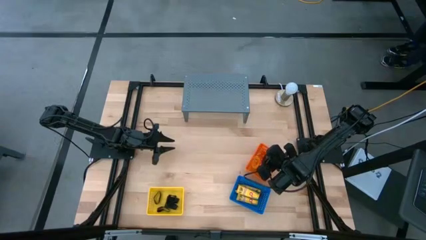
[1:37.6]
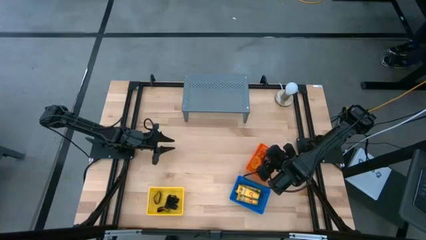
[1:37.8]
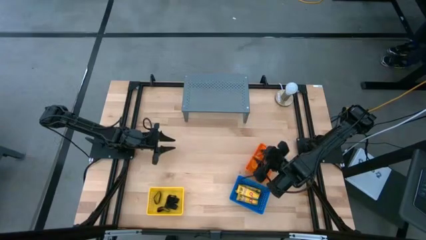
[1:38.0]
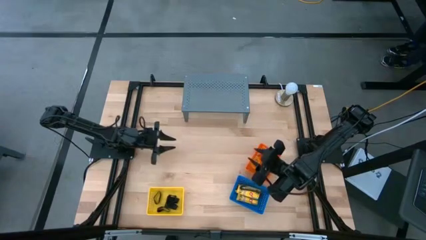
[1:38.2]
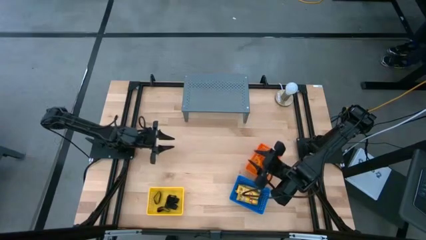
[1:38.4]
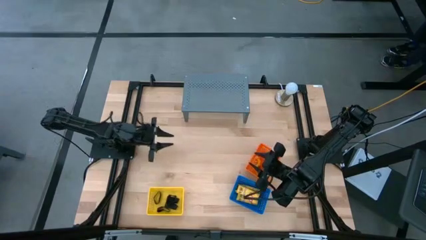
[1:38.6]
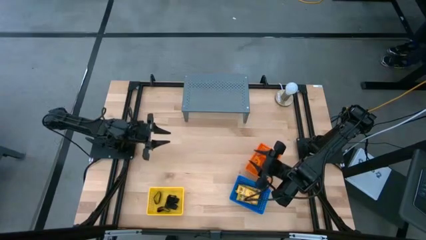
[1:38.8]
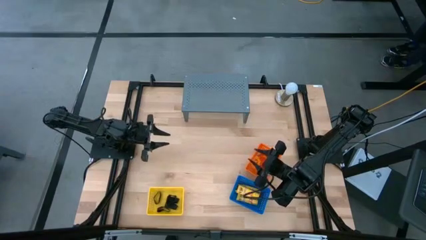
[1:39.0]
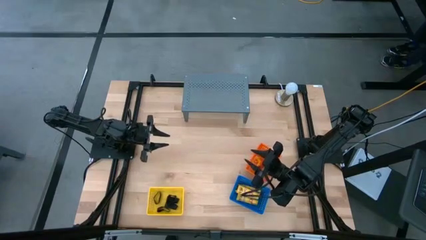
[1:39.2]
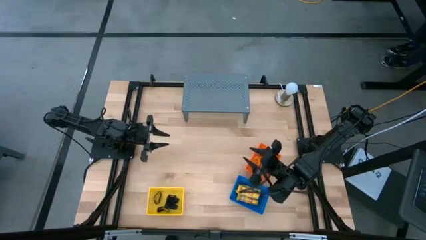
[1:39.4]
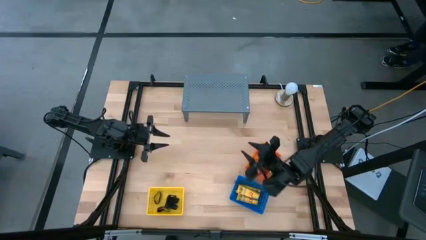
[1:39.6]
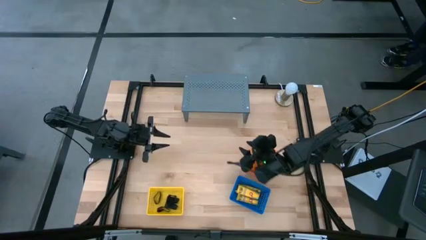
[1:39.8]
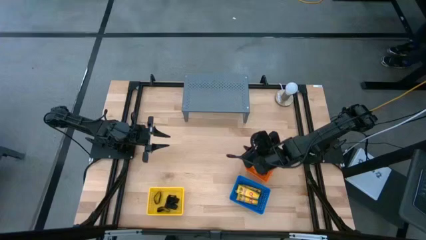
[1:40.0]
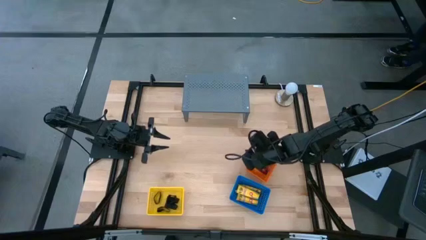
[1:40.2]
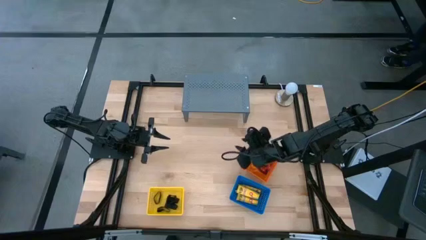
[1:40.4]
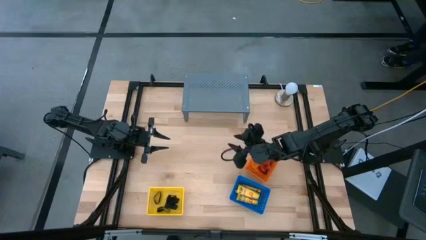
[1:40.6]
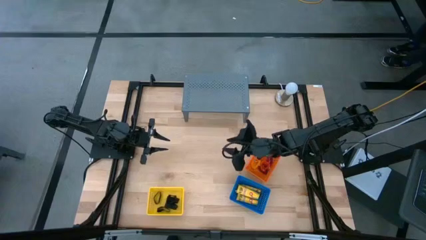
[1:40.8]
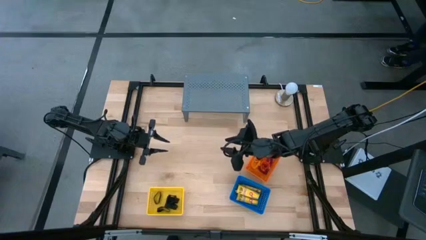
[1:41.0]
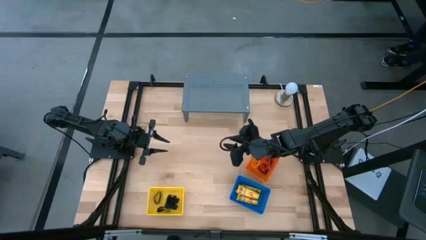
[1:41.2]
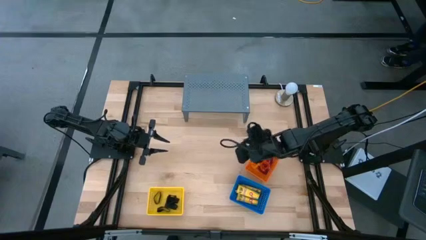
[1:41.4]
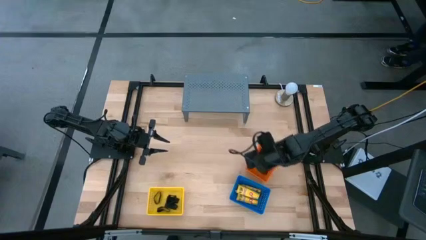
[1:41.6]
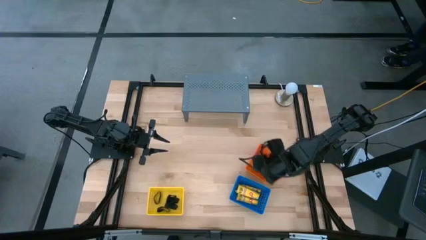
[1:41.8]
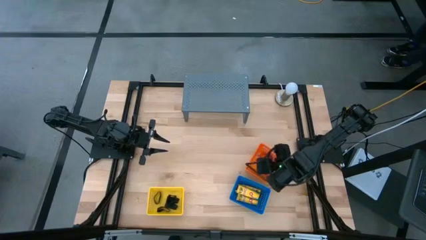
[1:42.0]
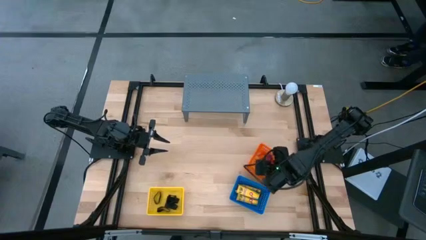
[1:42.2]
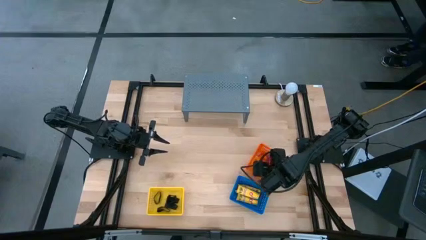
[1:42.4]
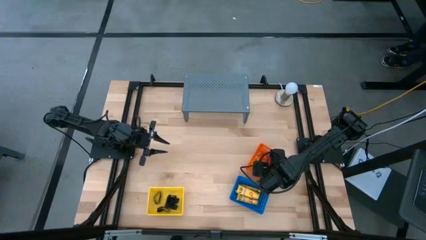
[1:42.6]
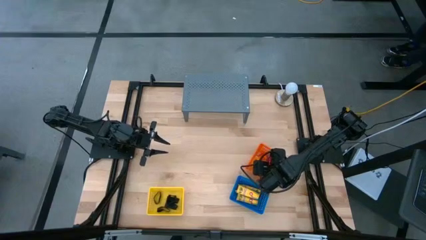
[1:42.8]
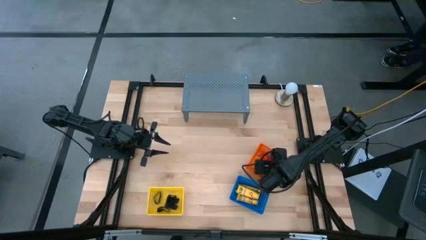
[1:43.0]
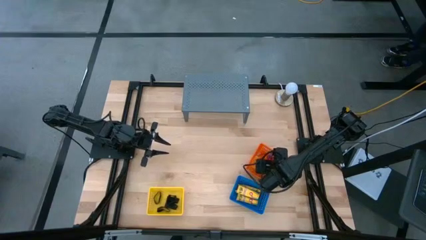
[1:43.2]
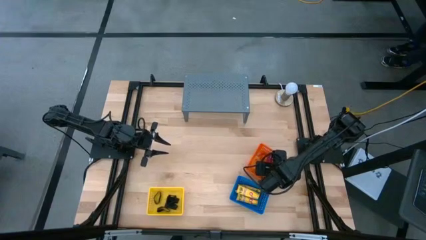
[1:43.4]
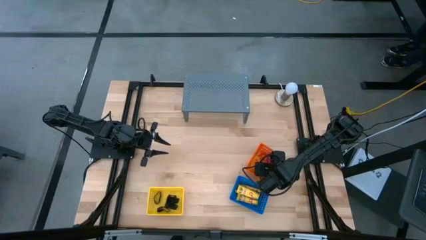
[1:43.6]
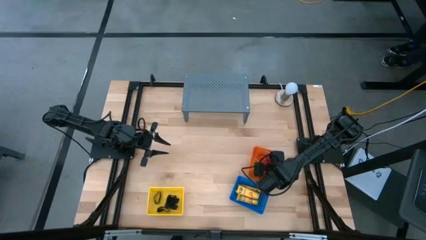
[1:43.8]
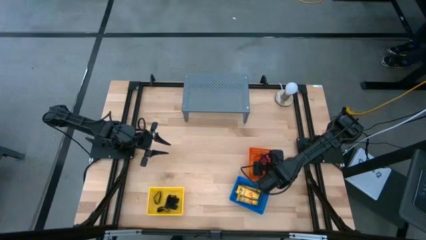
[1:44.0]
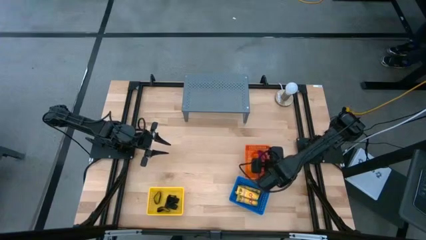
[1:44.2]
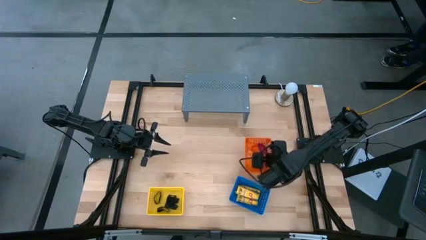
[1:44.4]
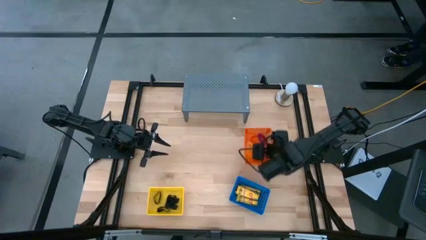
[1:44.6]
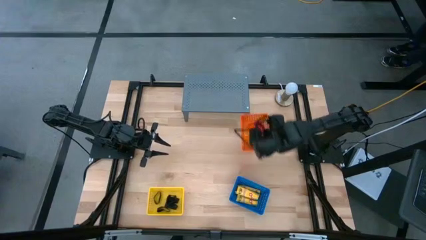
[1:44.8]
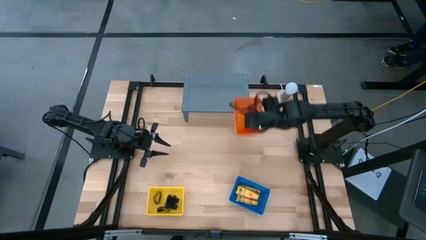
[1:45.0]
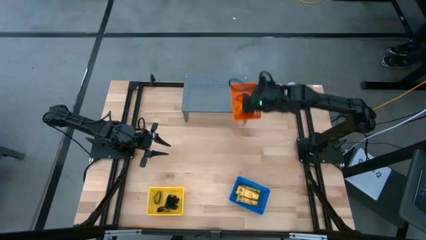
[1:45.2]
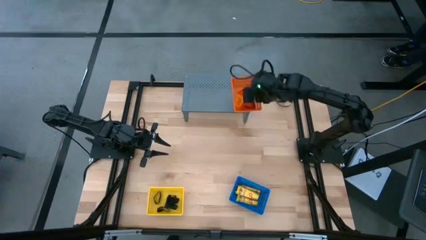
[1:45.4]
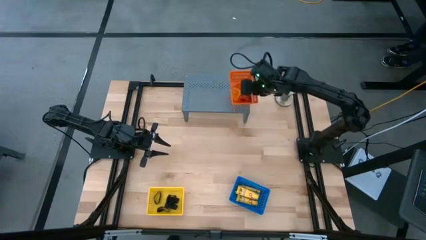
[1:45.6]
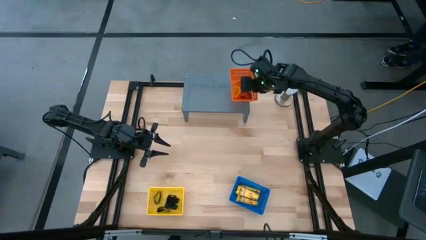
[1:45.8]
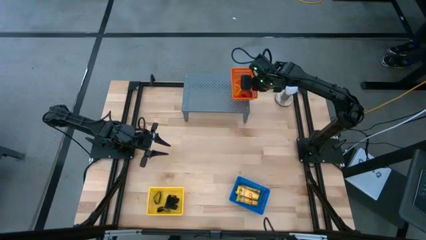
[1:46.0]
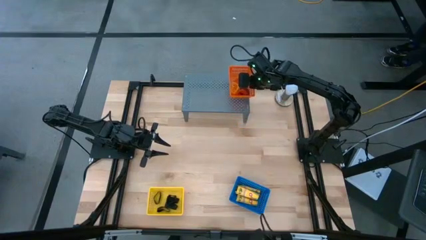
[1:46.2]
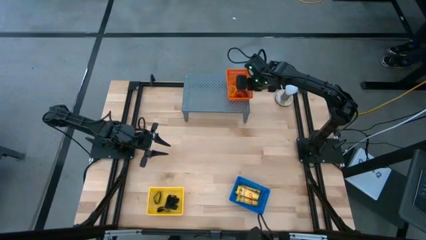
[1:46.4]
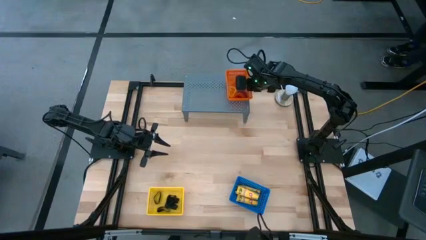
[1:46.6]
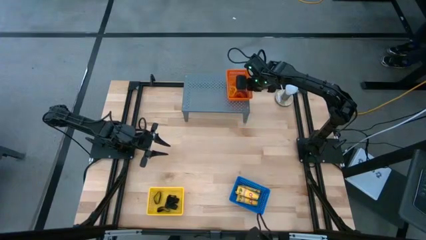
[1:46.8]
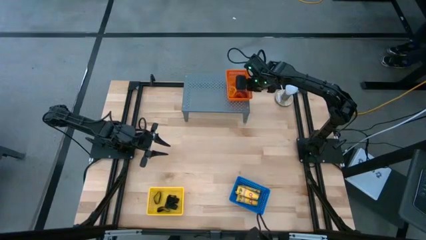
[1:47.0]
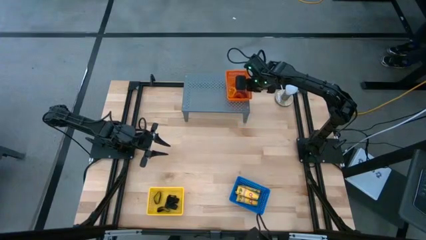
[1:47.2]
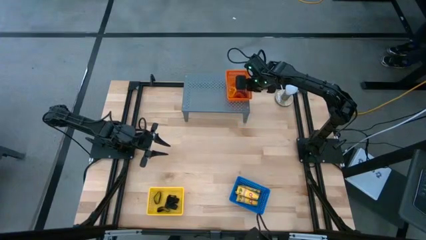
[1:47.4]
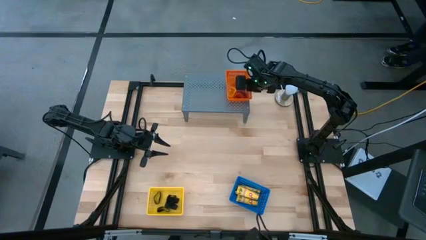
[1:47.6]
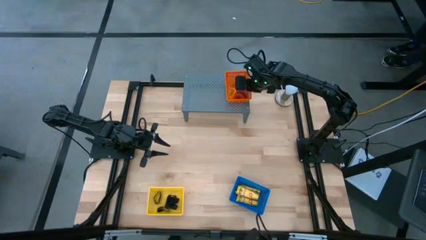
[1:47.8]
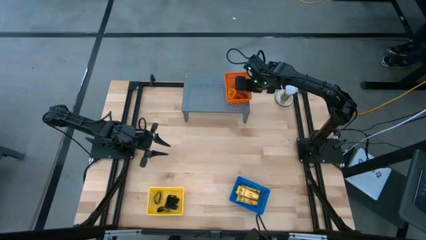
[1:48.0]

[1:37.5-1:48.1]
Task: Pick & Place Office Desk Supplies
Put the orange basket onto the shelf

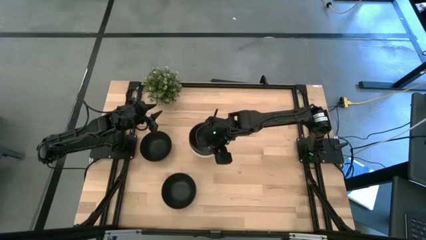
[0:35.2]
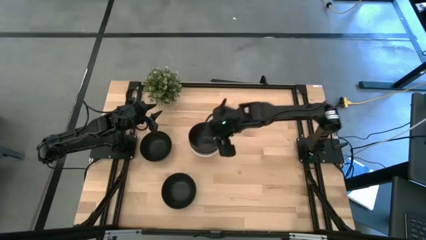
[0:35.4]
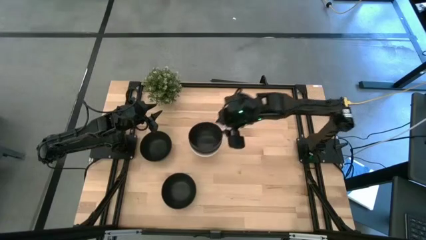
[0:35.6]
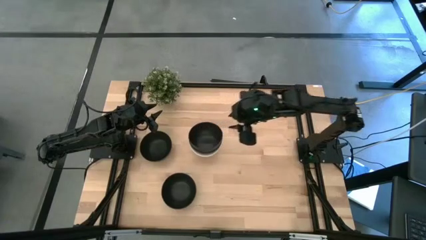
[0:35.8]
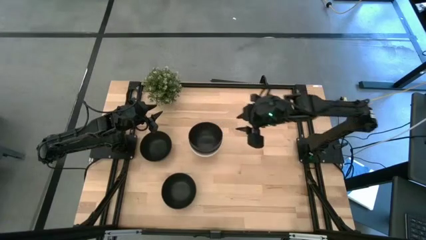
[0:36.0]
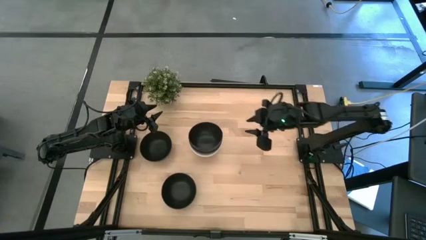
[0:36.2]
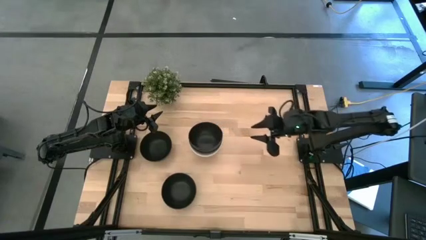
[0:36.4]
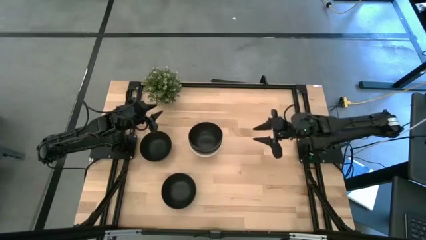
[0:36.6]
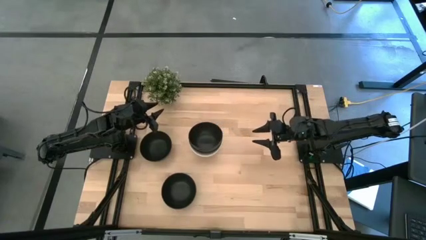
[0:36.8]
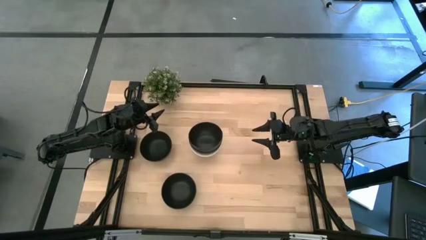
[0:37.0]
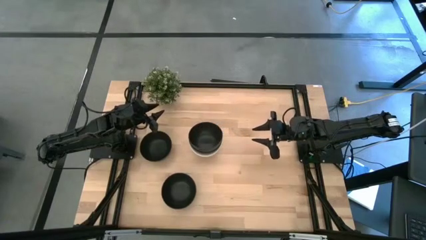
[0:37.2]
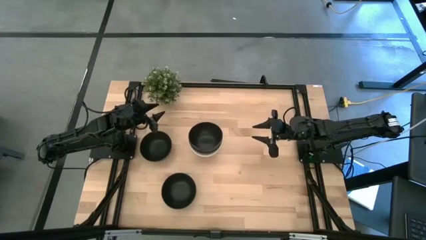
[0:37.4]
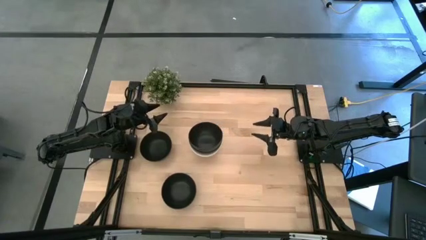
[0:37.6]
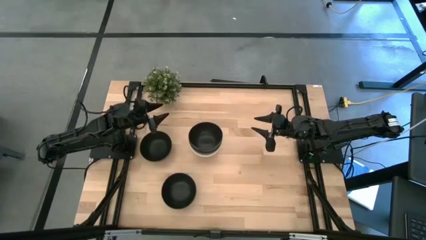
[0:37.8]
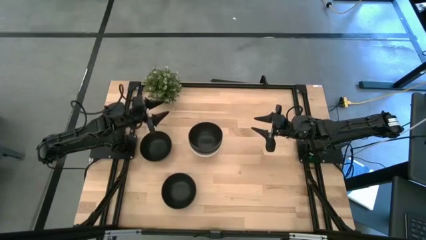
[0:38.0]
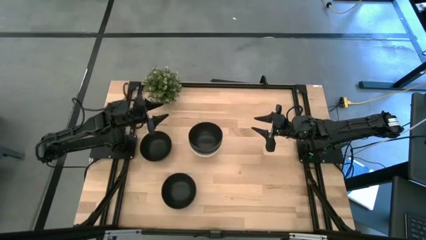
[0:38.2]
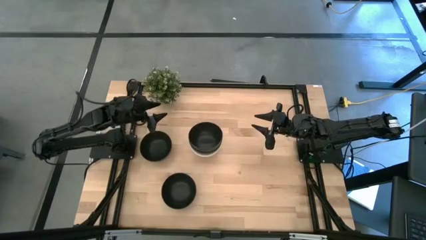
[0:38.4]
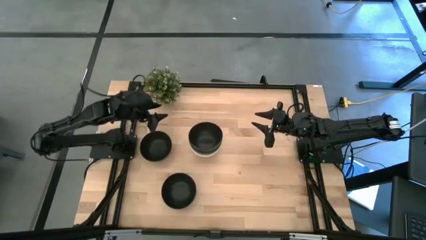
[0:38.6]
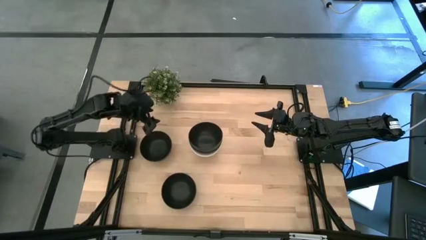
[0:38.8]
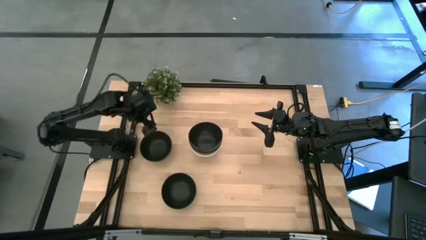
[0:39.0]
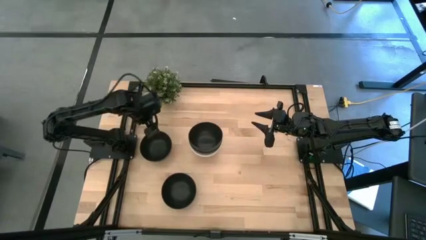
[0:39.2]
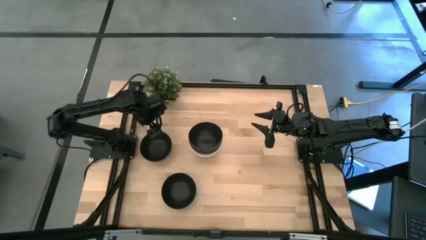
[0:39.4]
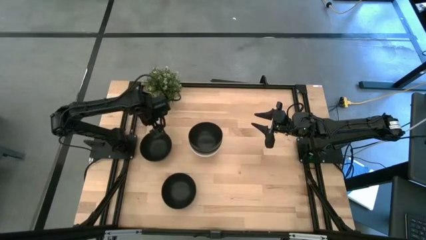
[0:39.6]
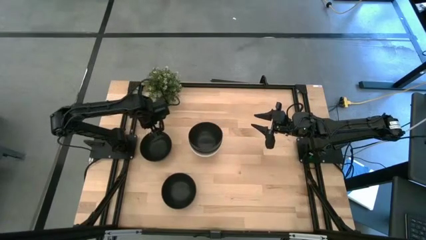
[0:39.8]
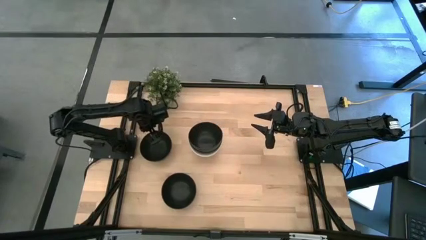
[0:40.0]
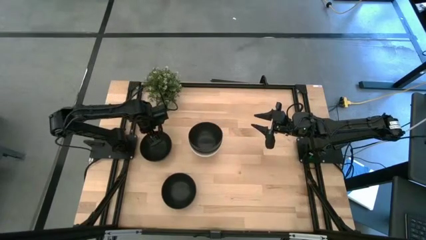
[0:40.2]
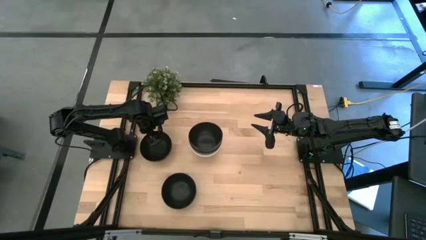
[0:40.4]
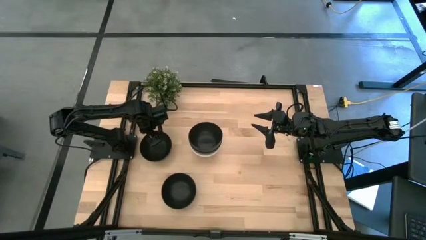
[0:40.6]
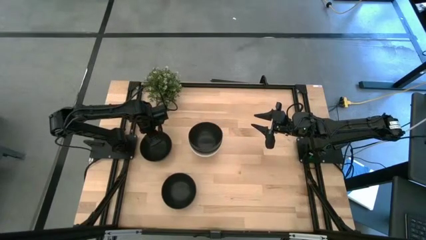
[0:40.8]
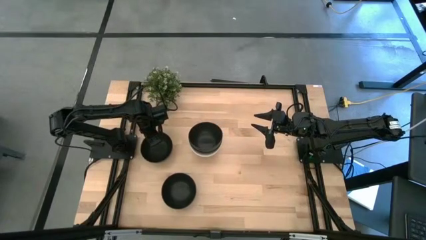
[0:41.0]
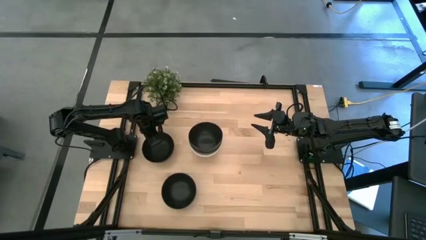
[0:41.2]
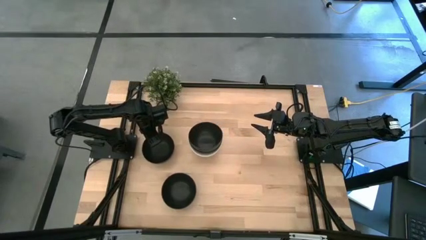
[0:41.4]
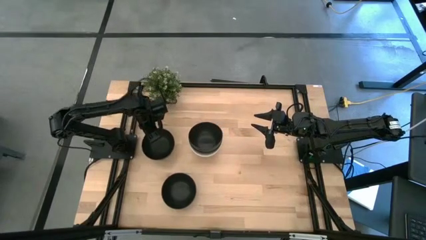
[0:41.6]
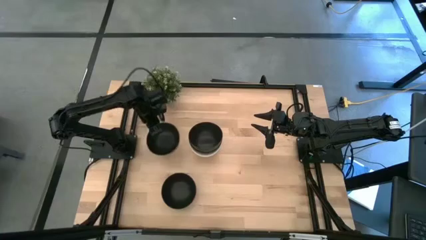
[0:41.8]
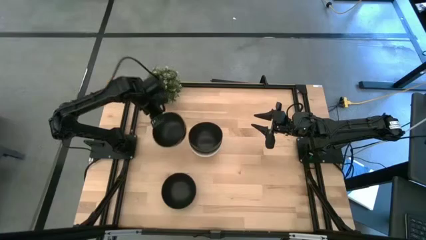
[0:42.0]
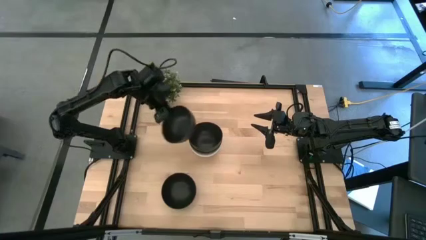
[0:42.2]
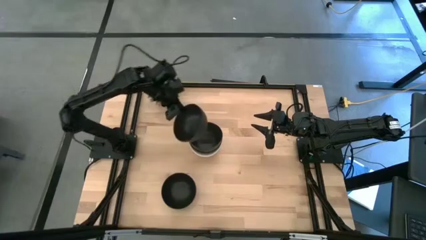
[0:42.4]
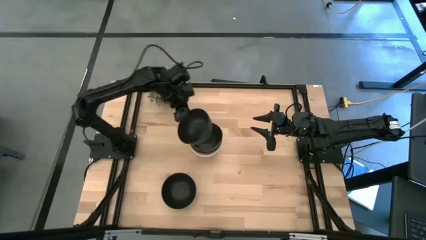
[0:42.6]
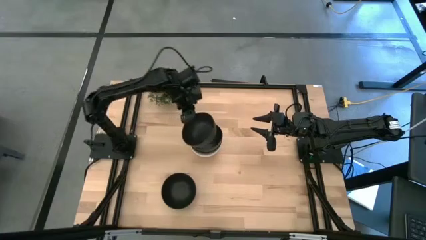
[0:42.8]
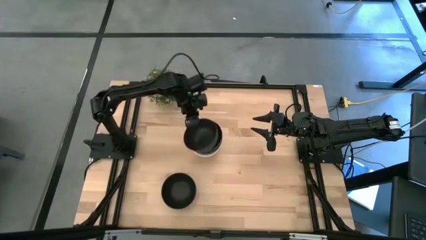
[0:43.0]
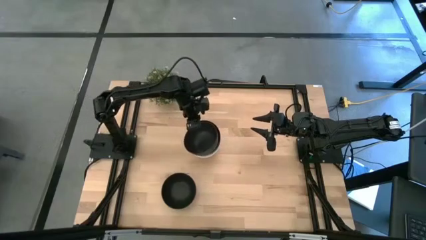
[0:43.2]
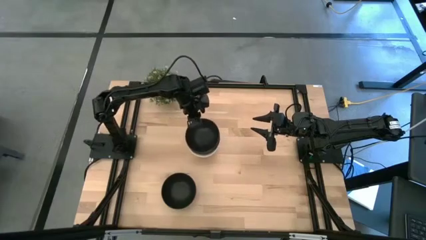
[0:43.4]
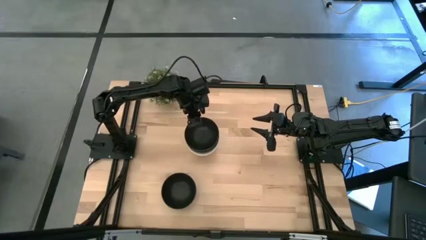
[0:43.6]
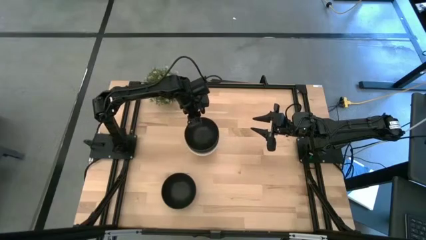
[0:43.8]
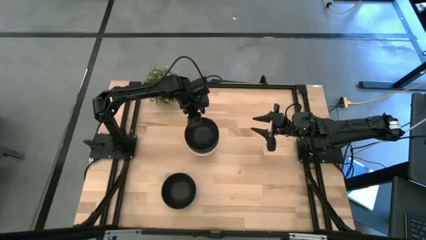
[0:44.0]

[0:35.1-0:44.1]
Task: Nest bowls inside each other
Stack the black bowl on the black bowl
